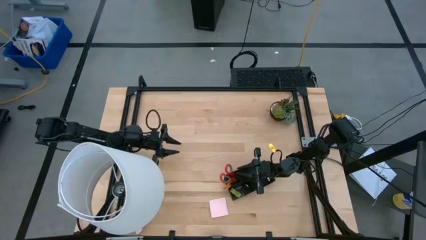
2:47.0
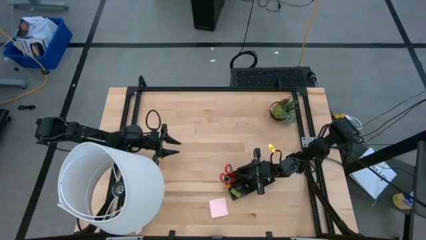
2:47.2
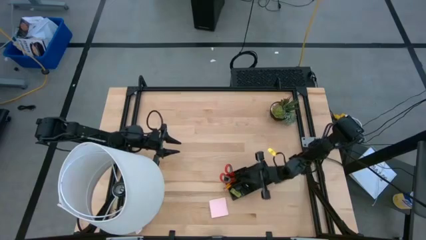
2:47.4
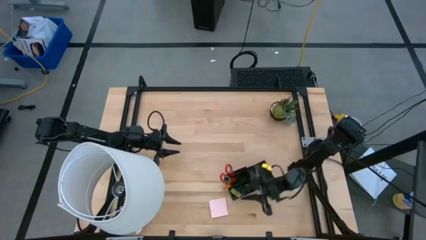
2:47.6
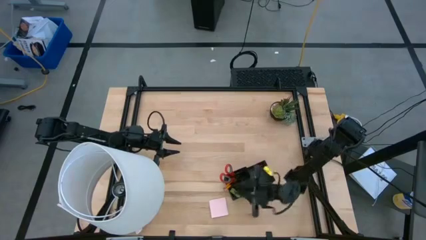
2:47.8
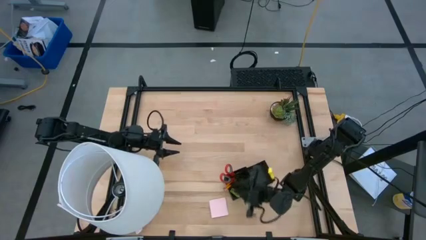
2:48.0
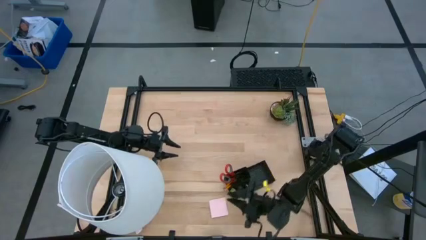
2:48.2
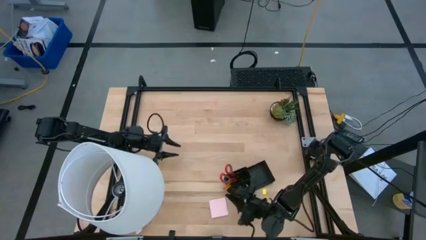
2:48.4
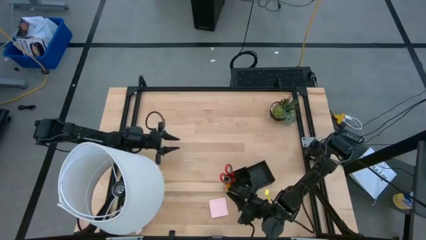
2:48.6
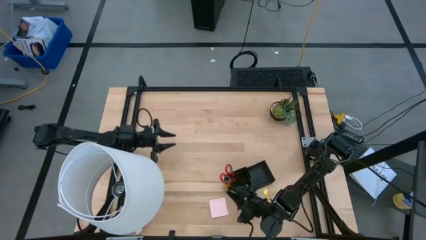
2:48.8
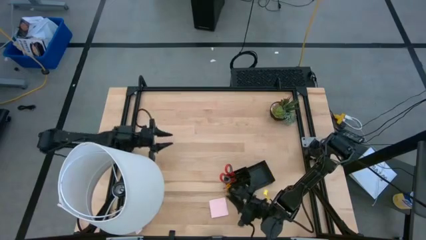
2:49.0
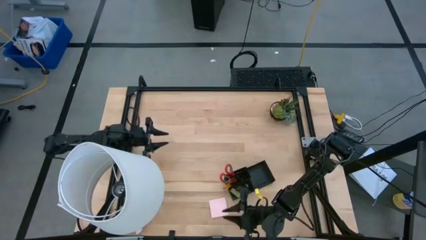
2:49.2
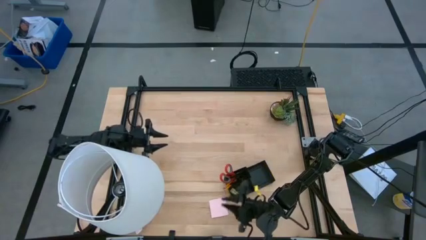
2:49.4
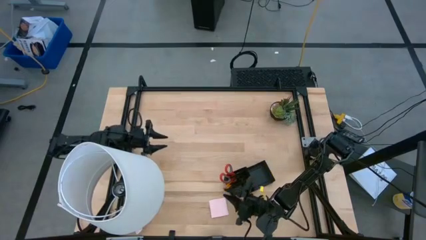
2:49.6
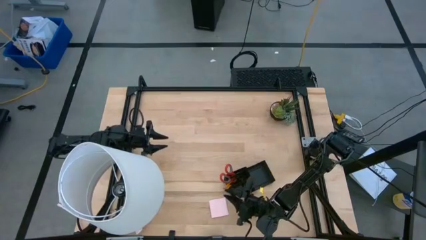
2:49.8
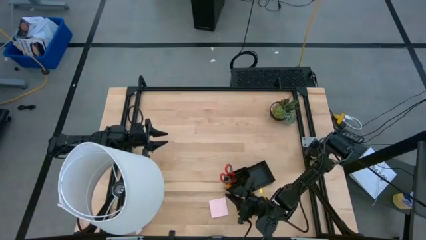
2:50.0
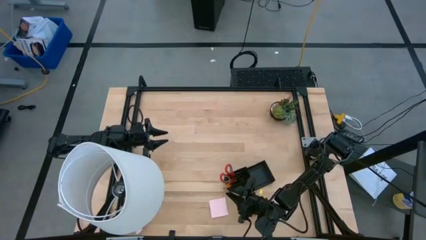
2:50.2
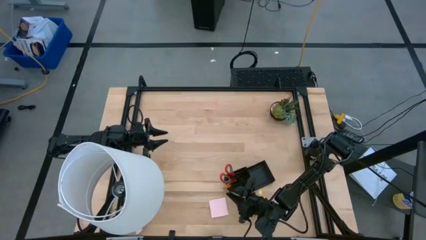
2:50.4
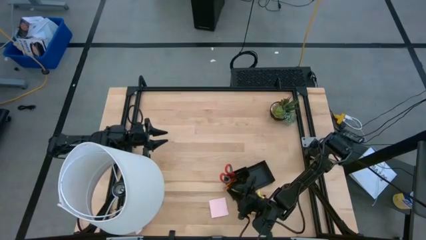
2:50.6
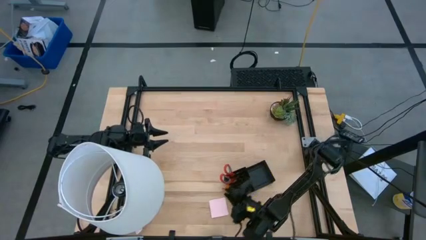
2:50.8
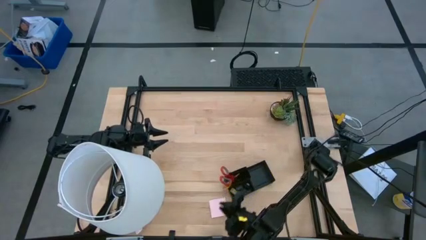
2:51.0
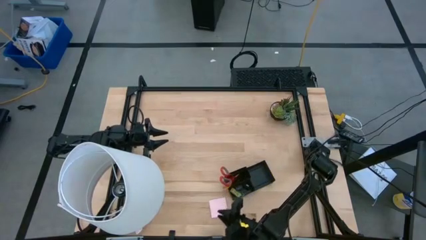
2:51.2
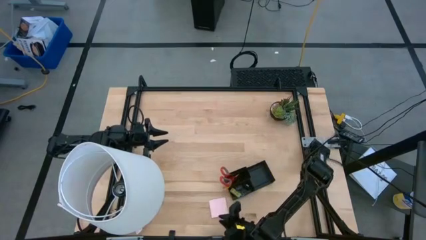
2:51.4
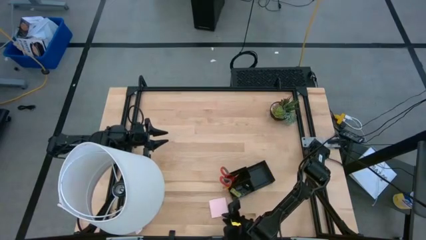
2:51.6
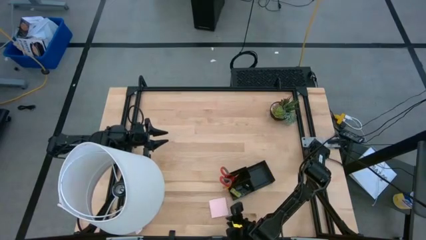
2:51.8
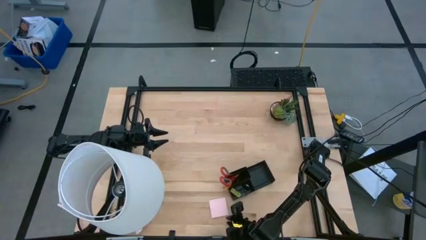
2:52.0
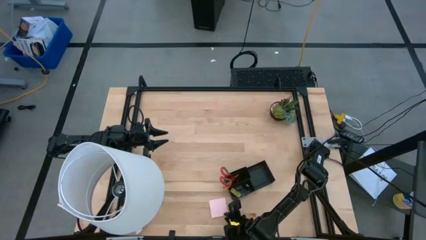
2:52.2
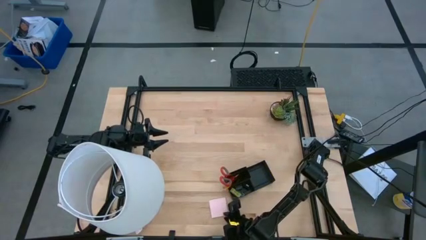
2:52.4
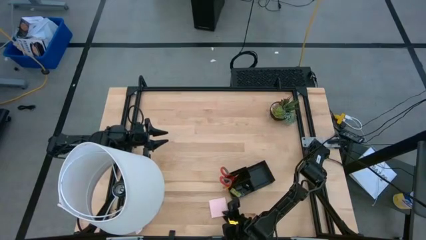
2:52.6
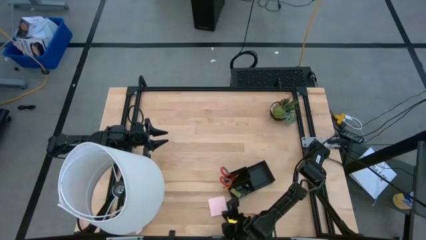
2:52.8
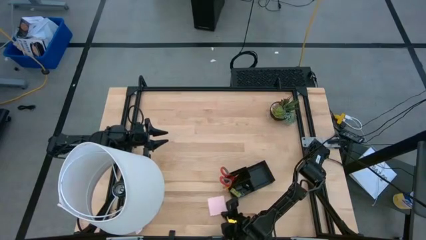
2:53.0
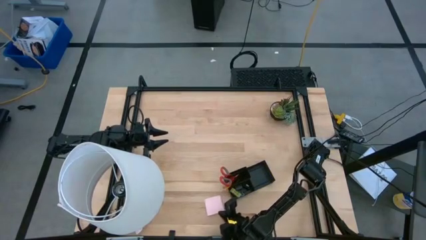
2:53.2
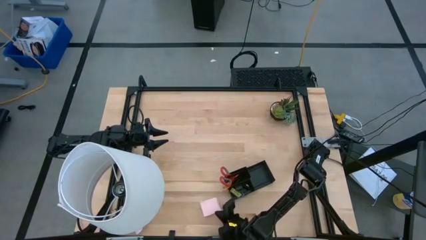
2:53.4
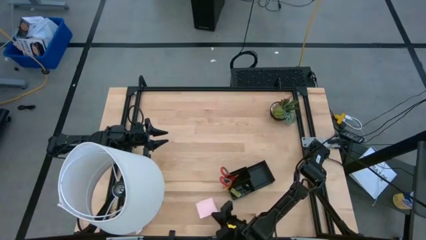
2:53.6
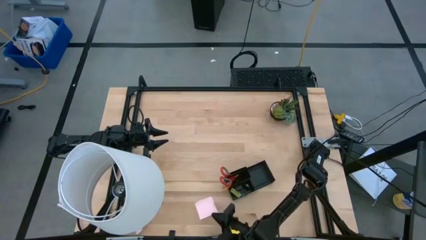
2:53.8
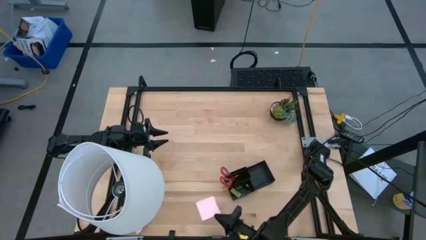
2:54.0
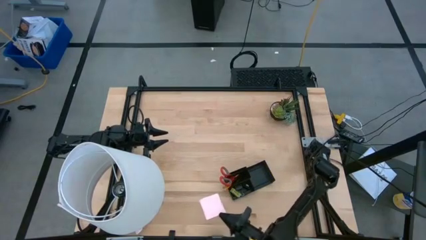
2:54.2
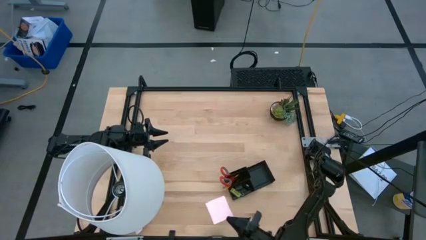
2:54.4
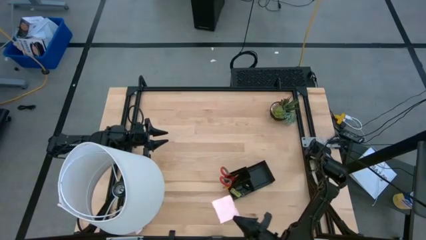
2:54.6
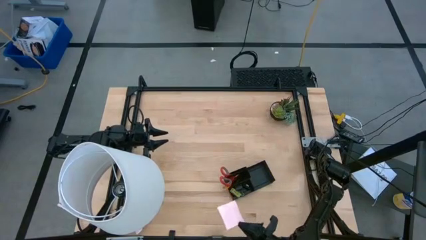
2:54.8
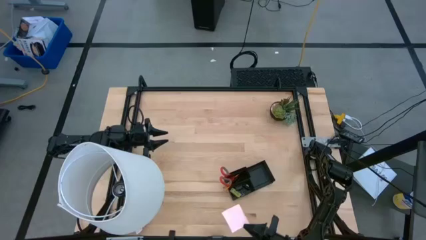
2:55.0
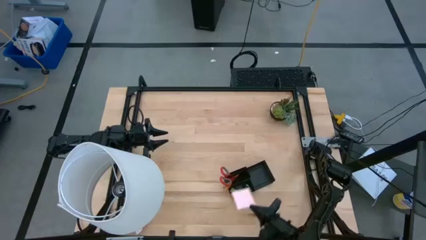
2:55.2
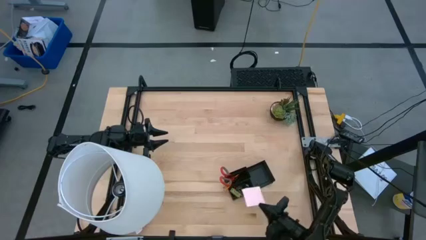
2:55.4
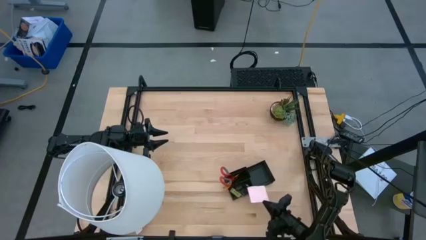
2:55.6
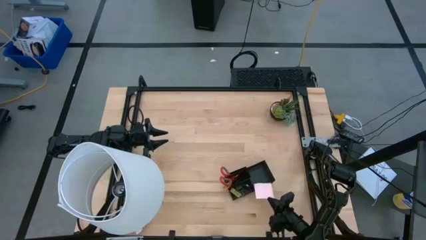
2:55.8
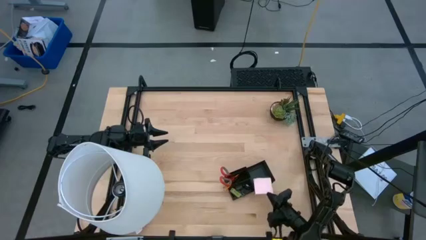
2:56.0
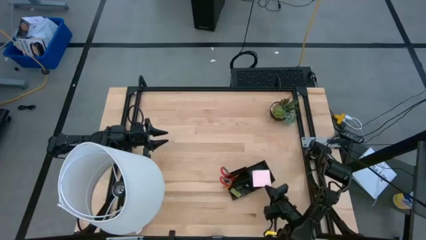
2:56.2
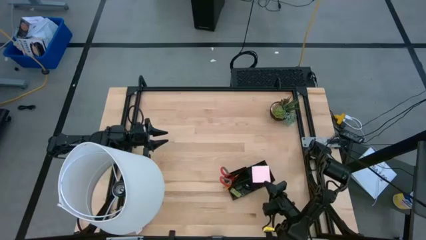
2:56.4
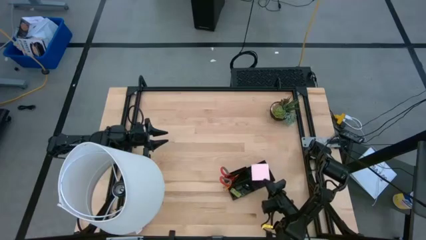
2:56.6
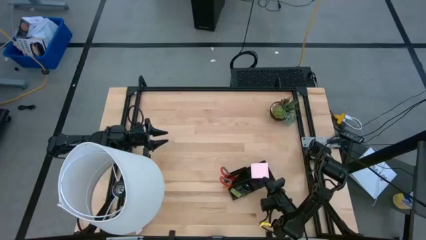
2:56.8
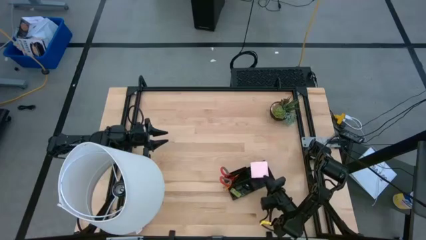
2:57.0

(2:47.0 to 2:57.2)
Task: Pick and place office supplies into organizer
Put the pink sticky notes into the black desk organizer

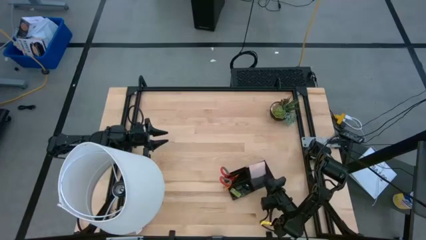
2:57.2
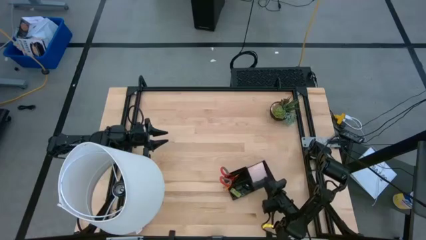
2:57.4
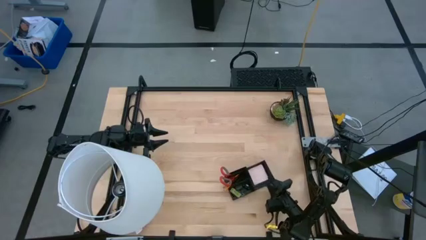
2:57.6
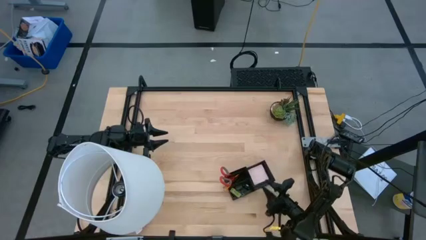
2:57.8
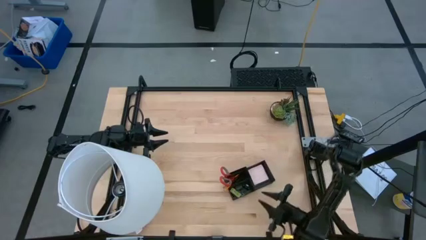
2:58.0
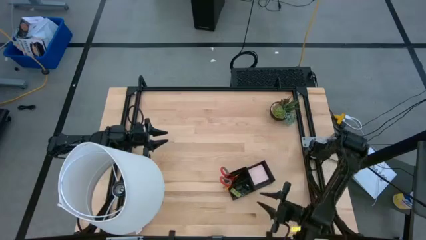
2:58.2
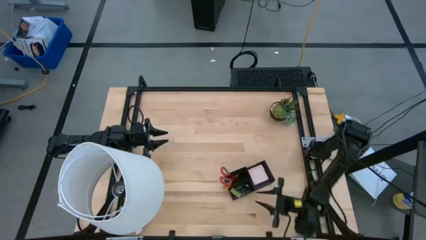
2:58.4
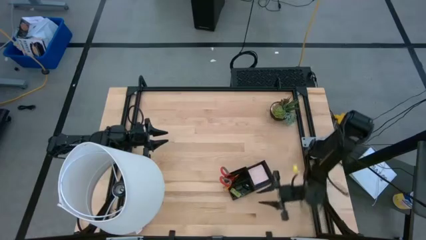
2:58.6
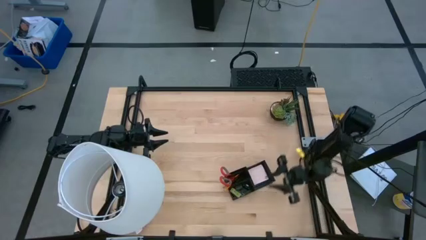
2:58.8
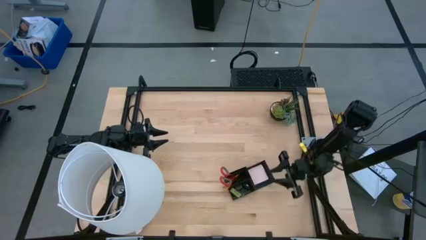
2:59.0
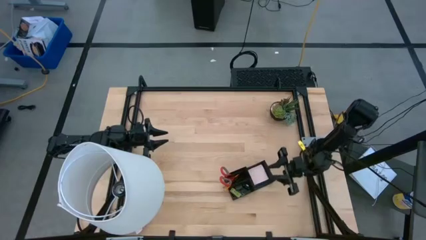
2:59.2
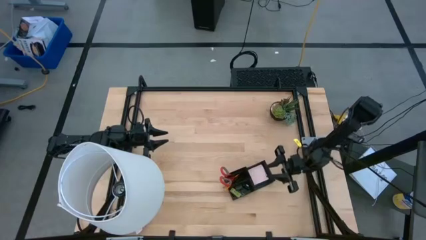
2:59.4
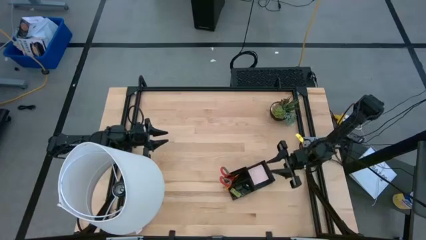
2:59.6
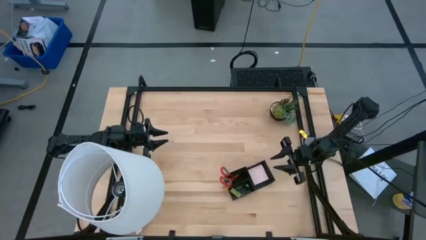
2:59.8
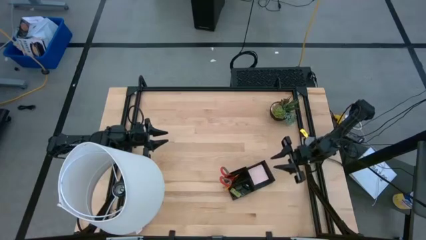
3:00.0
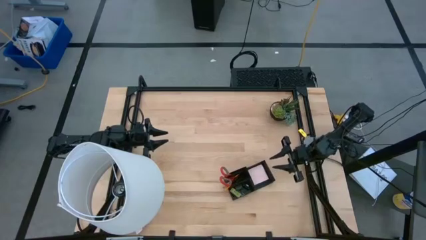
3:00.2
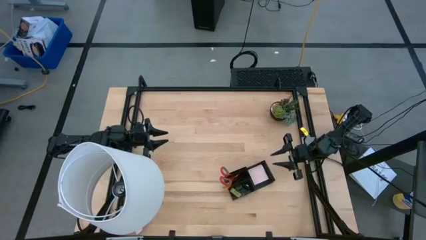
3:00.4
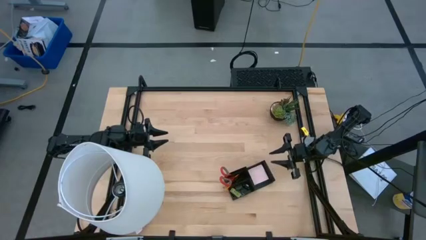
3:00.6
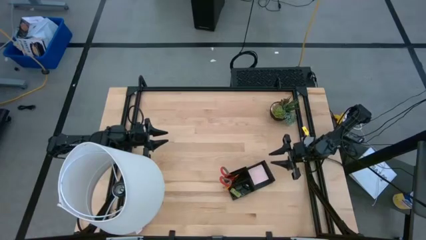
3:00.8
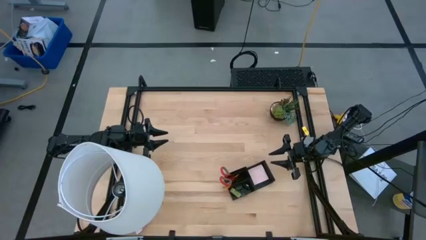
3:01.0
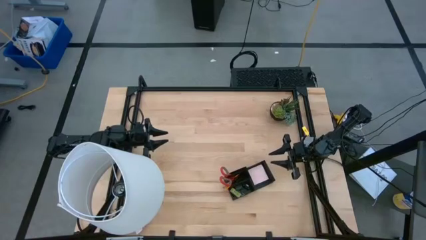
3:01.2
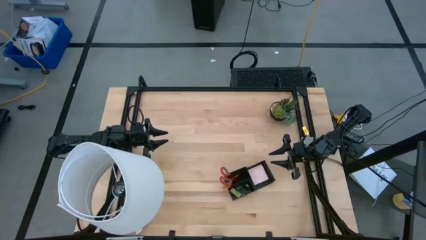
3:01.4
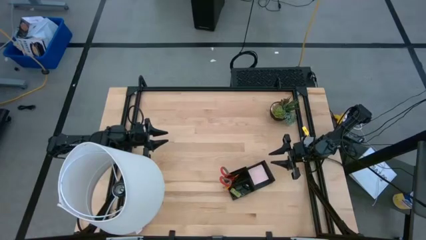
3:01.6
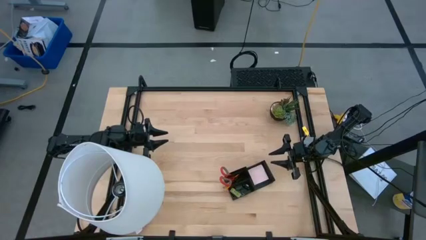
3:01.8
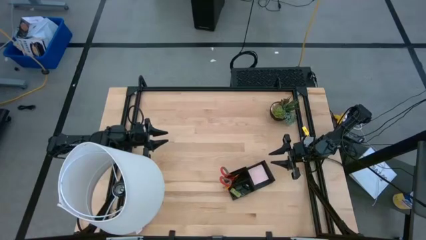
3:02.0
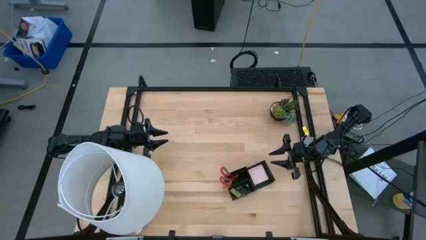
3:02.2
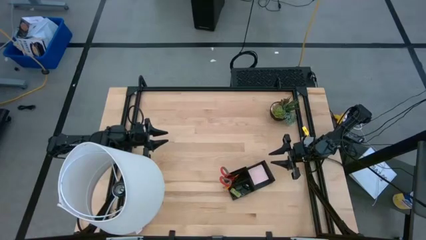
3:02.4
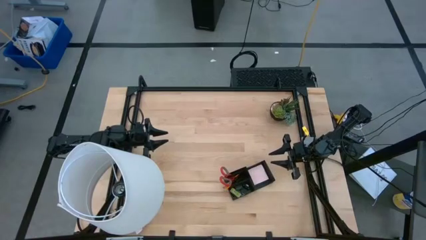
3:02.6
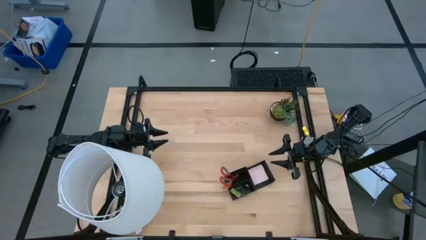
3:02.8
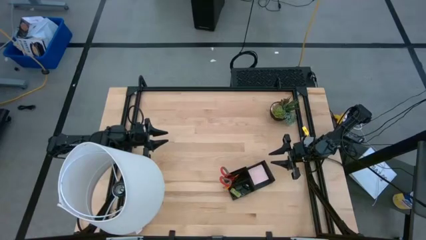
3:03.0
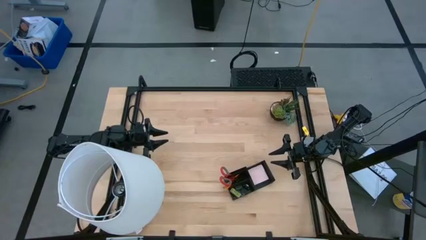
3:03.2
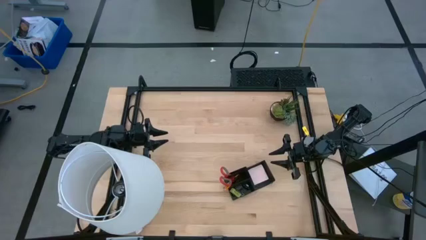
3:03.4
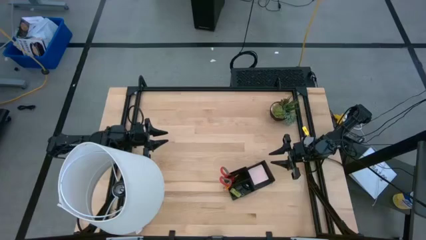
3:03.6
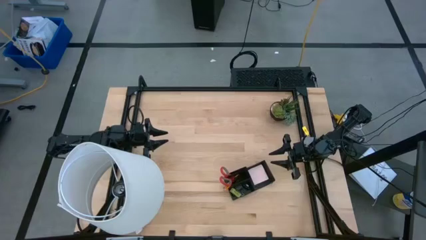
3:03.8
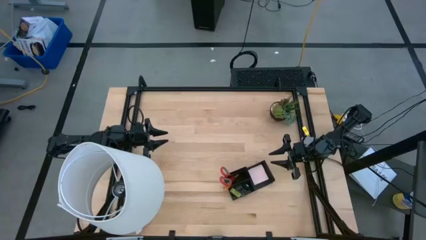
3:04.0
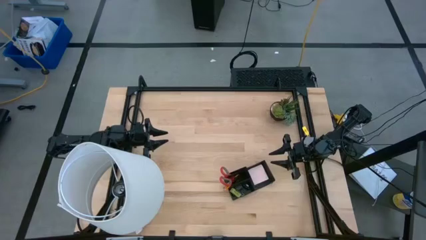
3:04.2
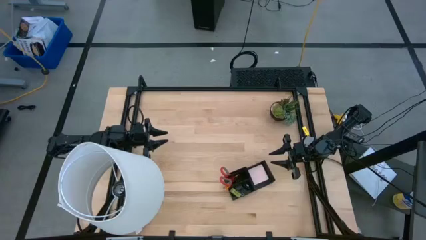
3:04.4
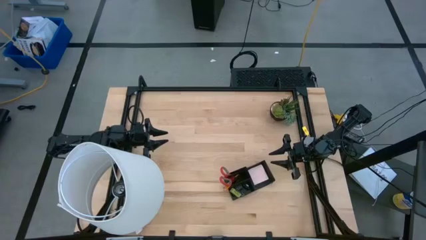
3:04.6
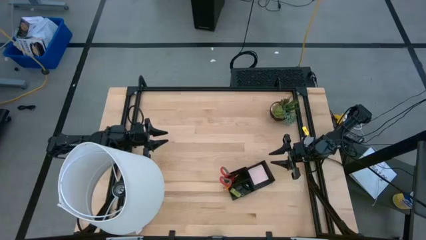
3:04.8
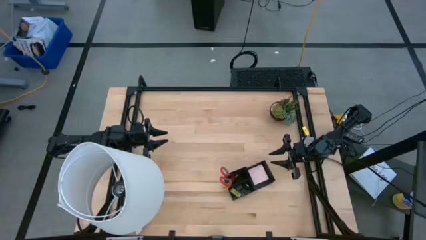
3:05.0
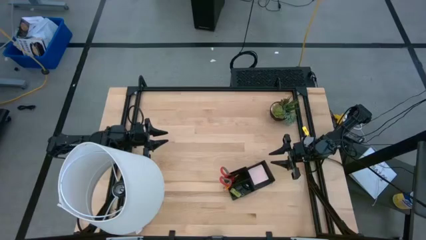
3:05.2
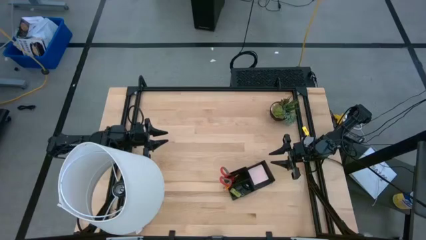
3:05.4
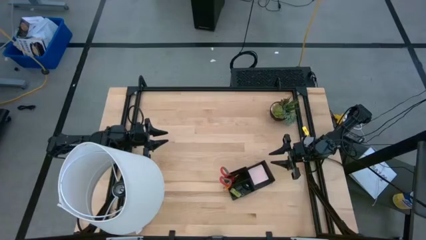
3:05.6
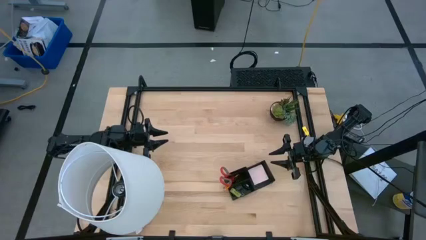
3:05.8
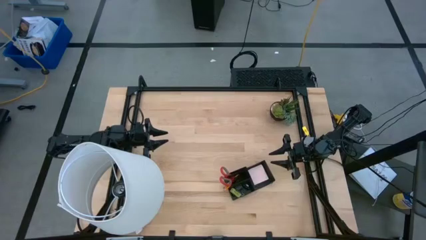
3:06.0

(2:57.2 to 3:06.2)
Return to Home Position
